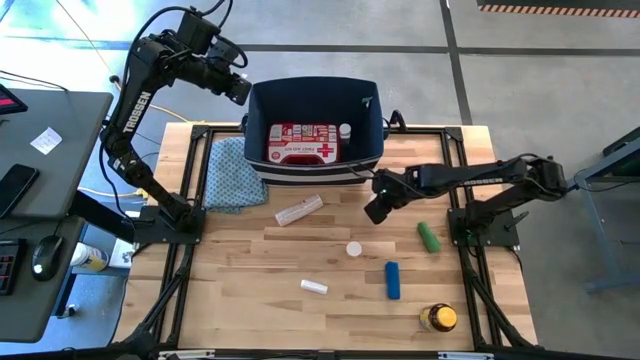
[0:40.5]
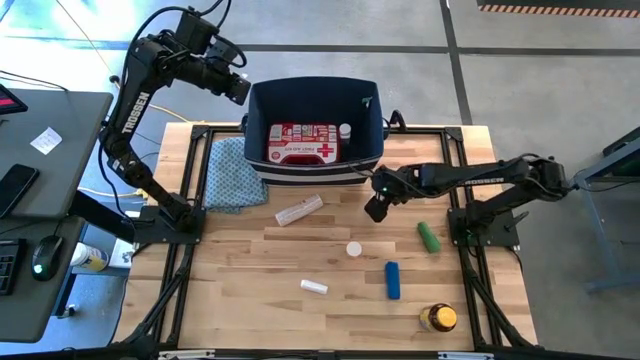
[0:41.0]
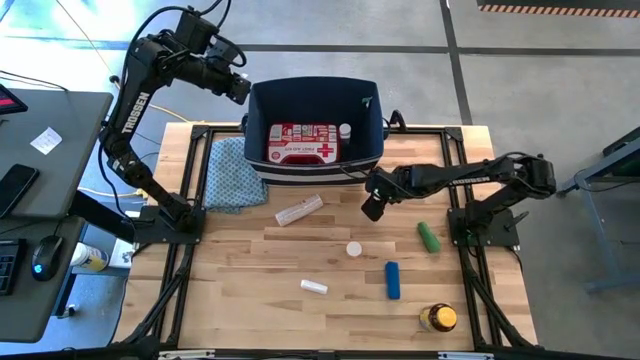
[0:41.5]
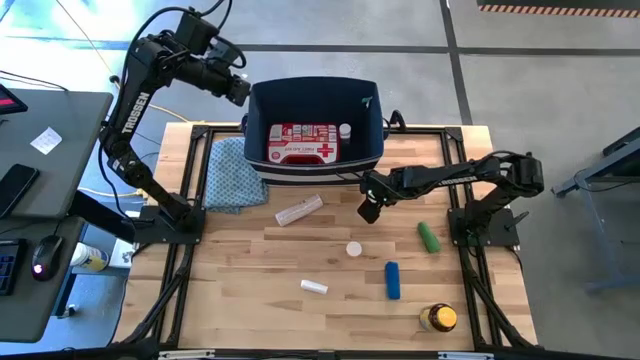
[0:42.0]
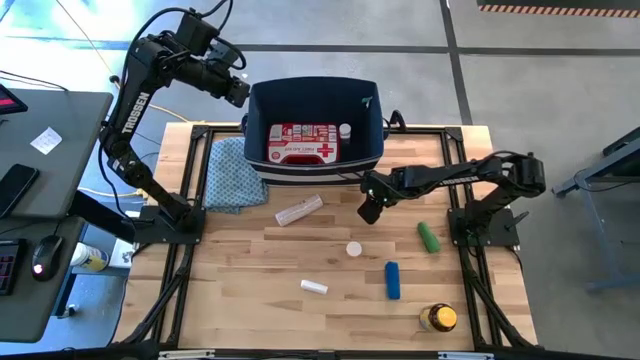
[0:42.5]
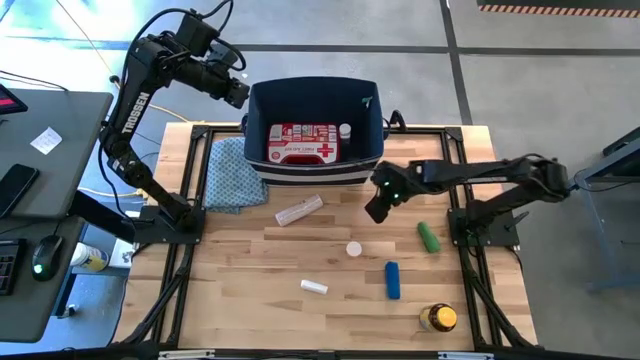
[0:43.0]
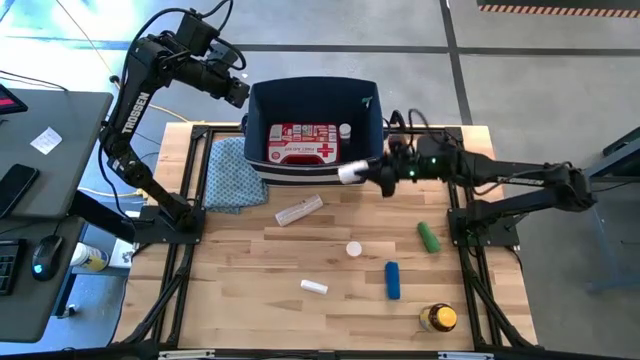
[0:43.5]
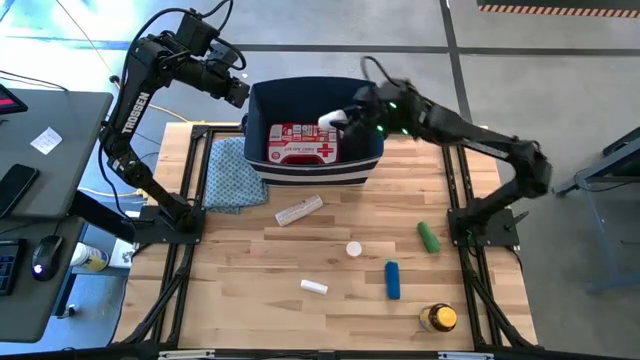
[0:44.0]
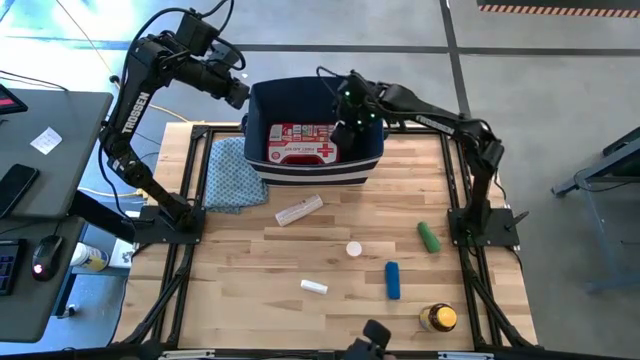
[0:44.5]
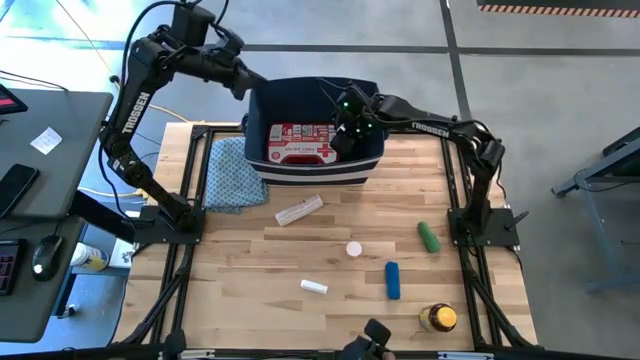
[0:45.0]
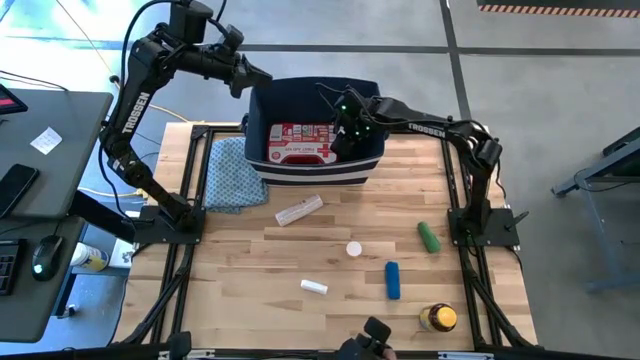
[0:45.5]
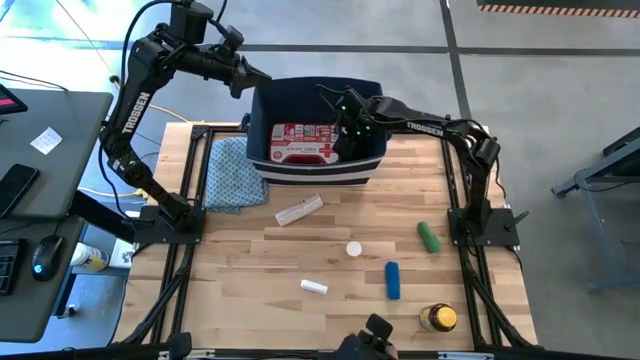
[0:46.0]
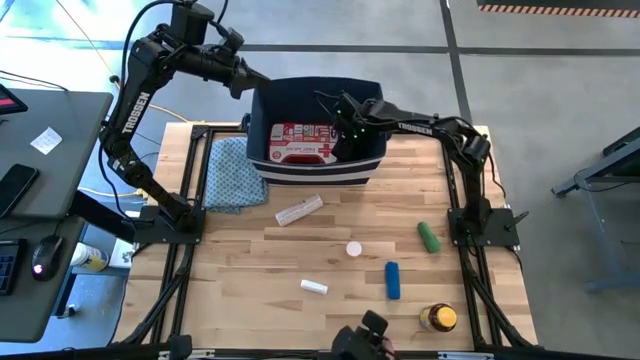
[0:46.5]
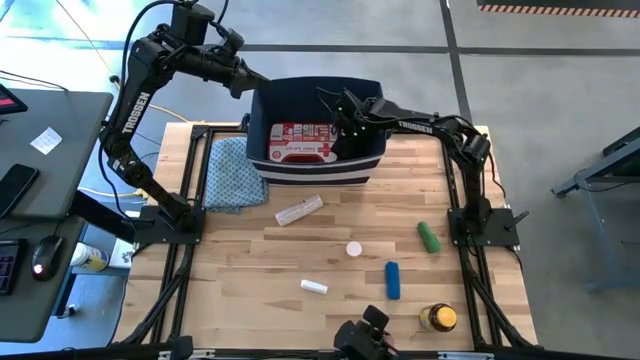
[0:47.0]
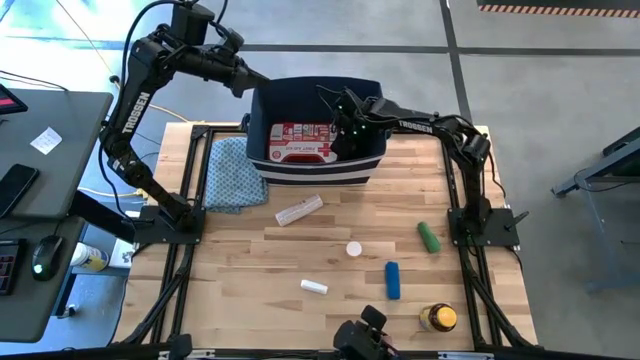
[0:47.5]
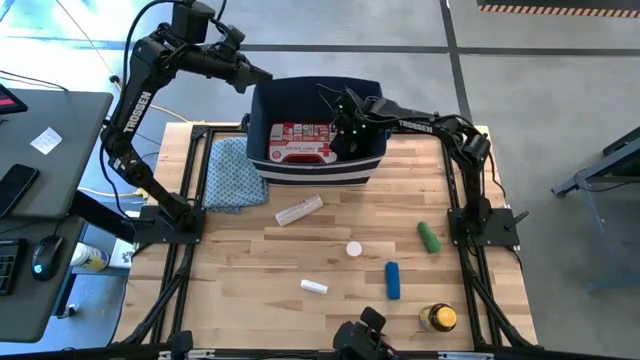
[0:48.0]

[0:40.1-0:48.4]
Task: Pick & place medical supplies in basket/bin
Put the white medicine bottle into the blue bin

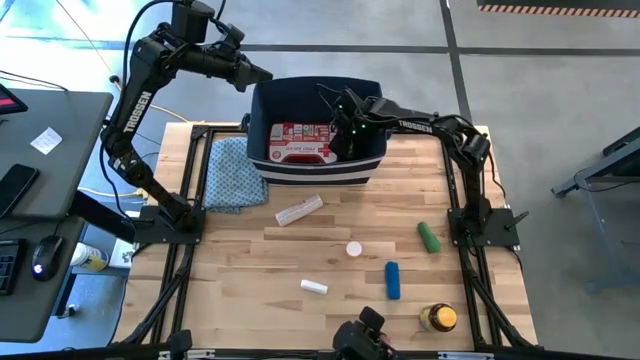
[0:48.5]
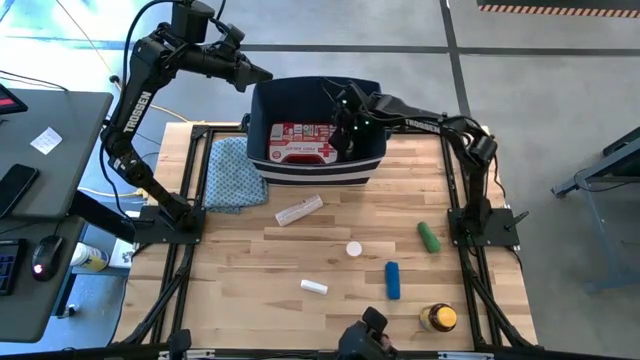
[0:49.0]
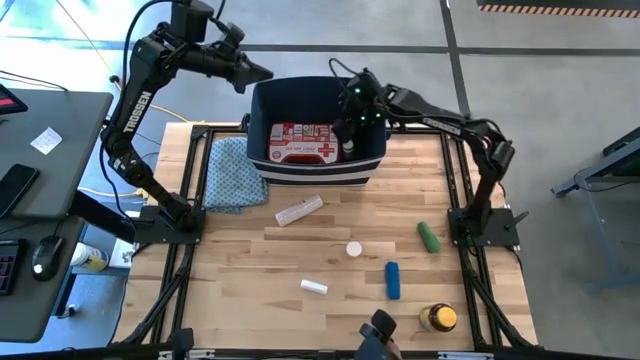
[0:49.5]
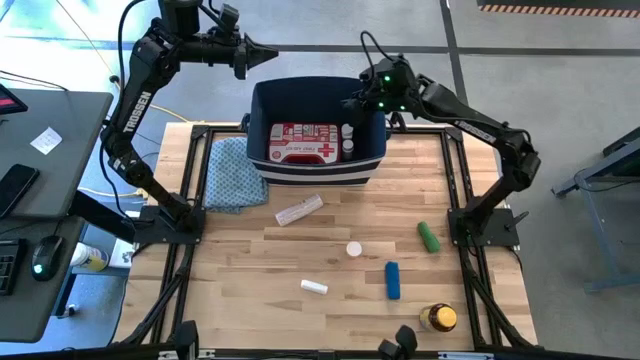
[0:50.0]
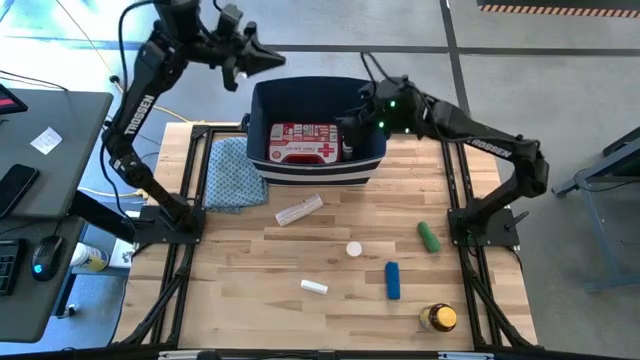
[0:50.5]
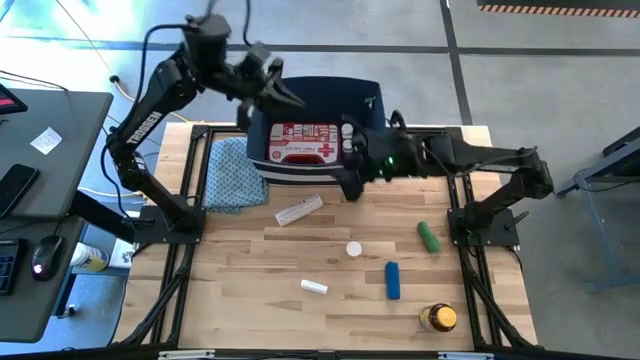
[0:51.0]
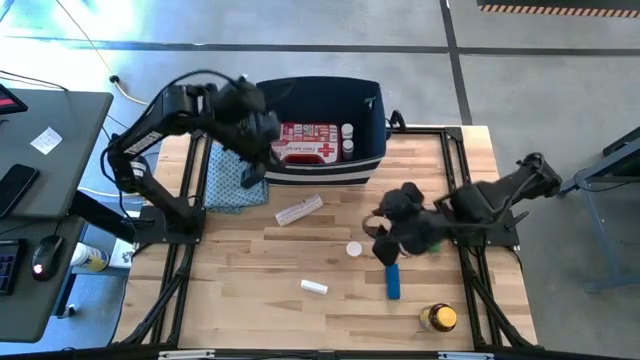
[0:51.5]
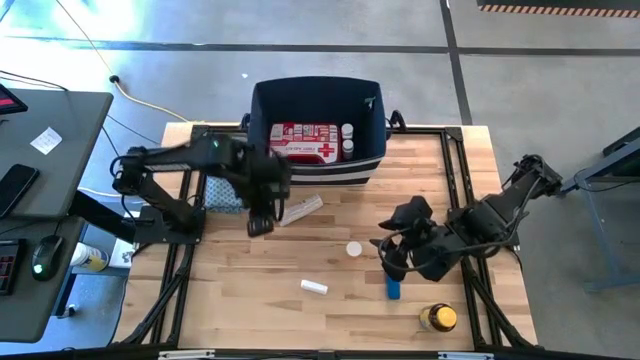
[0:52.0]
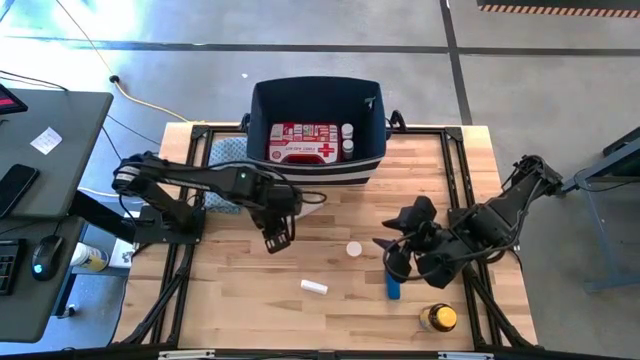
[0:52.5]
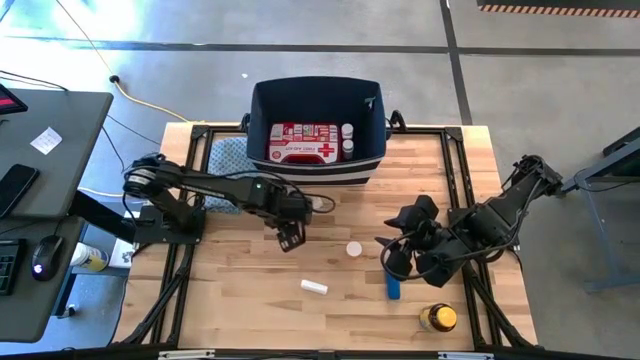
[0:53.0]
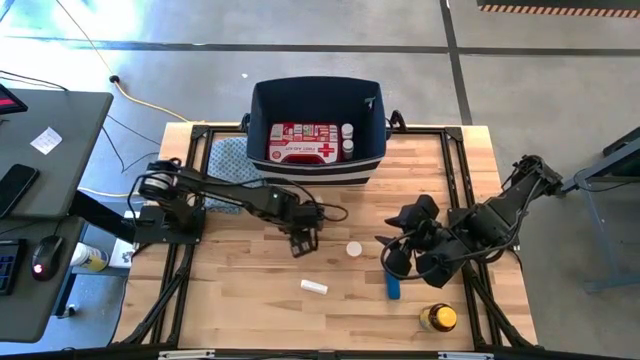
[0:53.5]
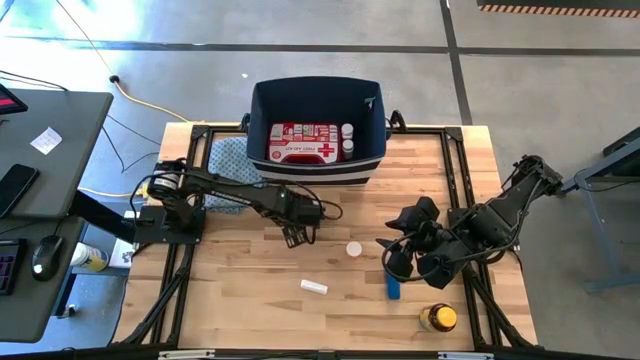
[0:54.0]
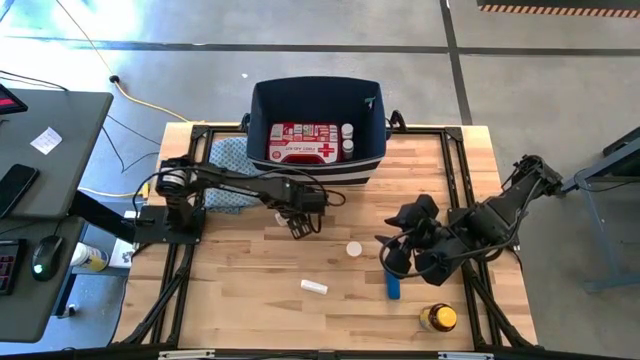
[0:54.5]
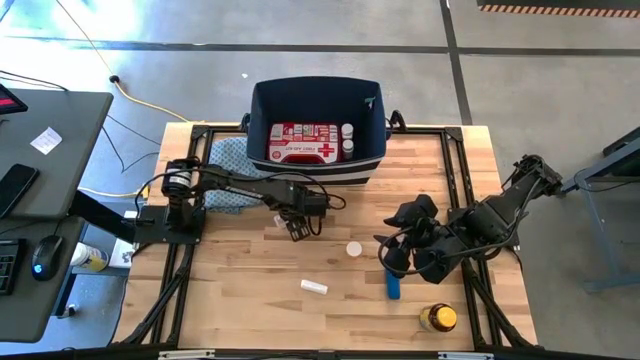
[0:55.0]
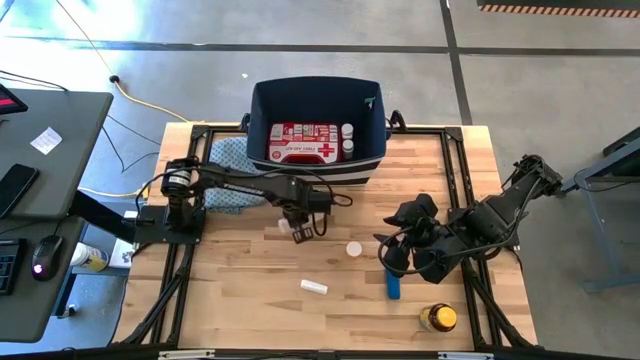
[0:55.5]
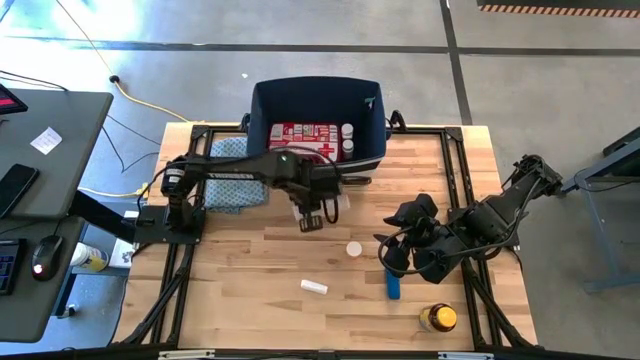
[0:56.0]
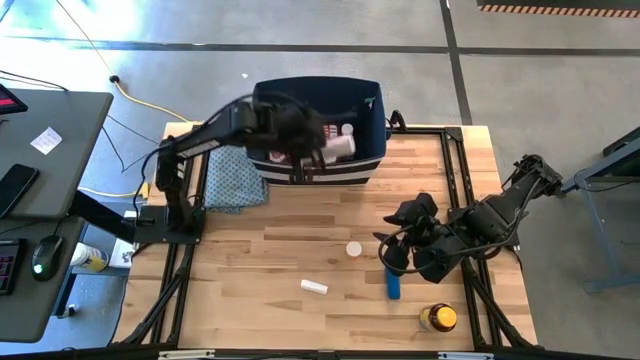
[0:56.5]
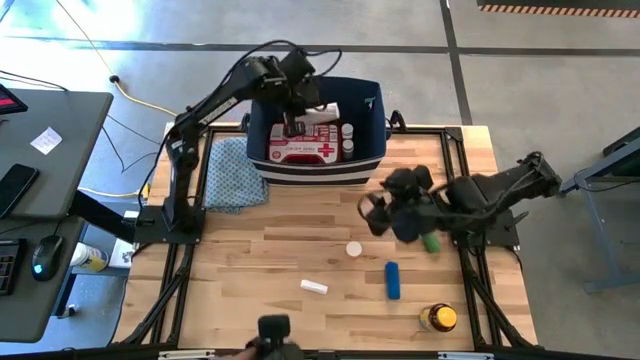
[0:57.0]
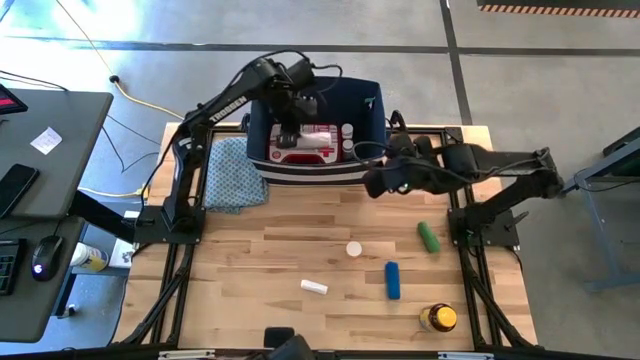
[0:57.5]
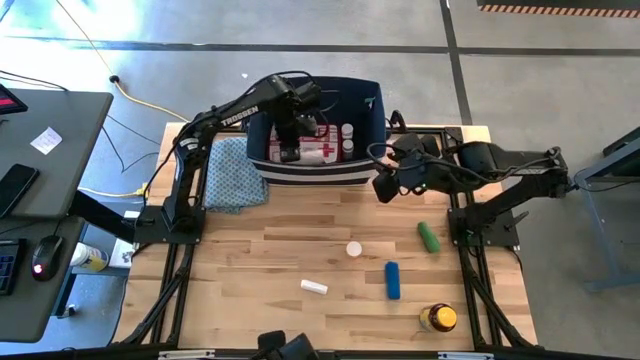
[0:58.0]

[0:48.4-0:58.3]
Put the light brown bandage into the blue bin

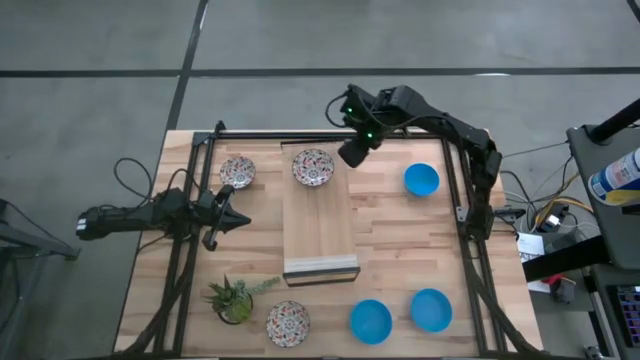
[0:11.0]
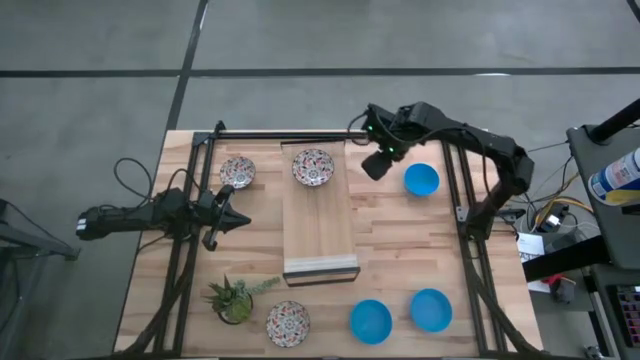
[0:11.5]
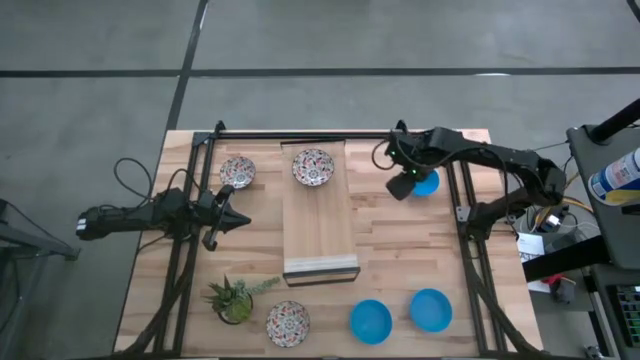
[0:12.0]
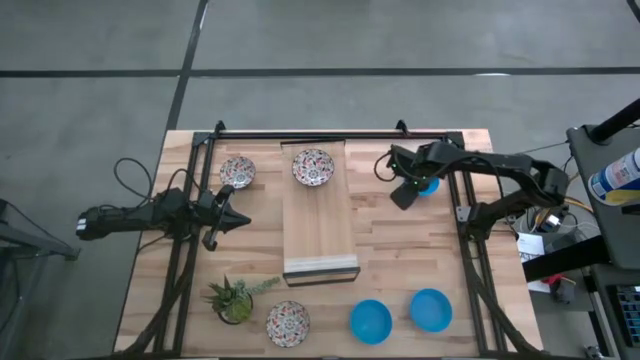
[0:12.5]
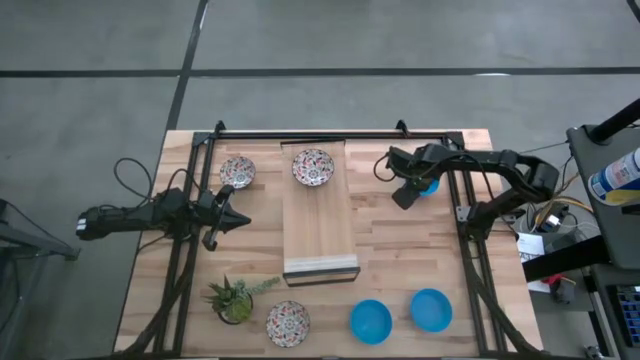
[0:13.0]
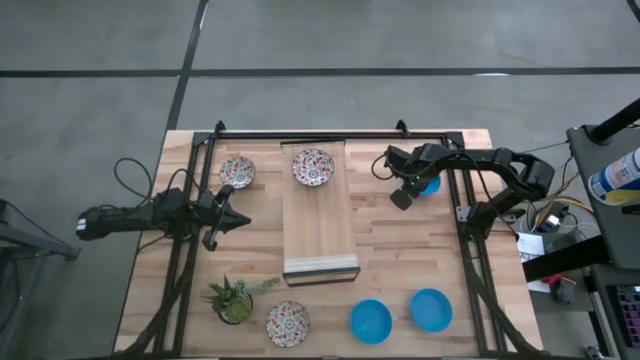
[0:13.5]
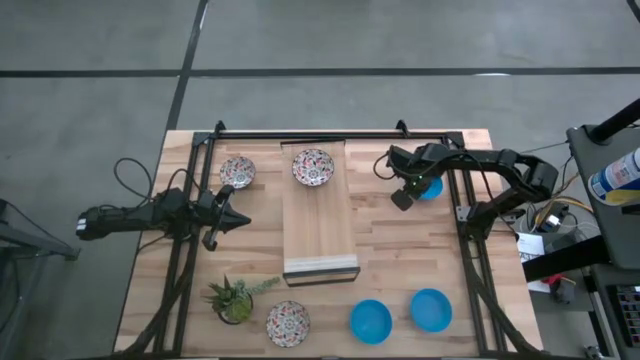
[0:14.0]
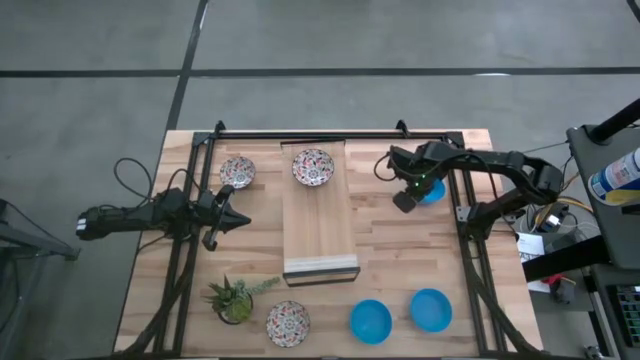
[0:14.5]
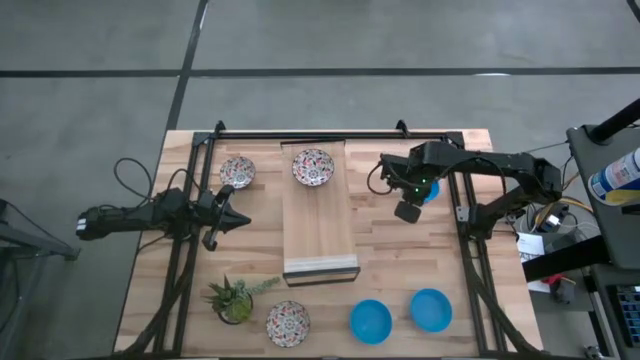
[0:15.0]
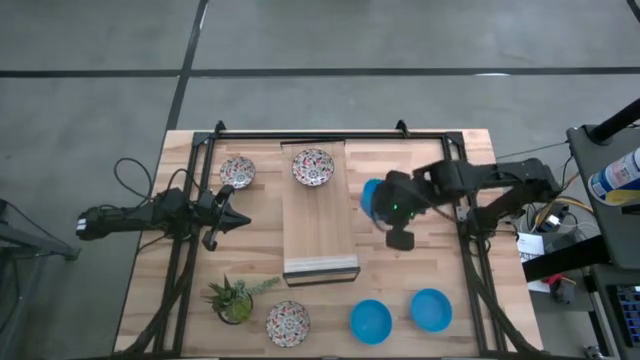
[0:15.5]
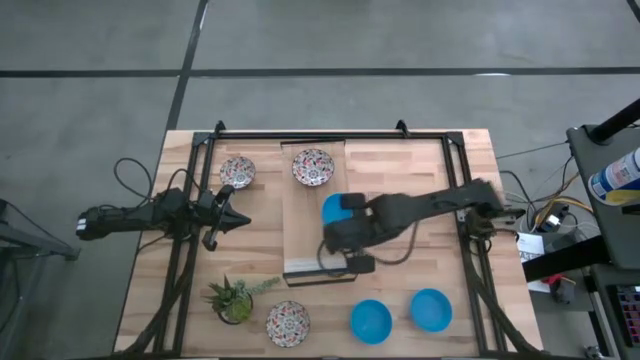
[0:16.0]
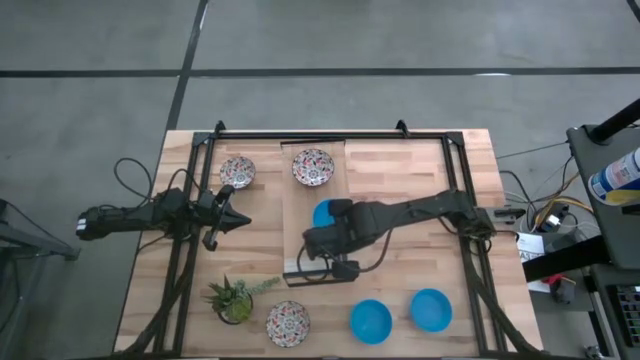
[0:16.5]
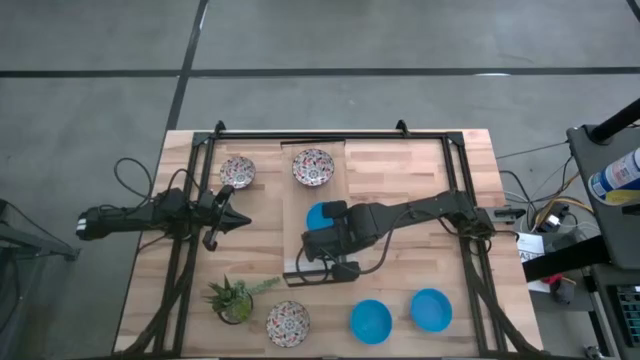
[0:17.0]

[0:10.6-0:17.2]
Task: Pick & Place Mini bowls
Put the top right blue bowl on the shelf
